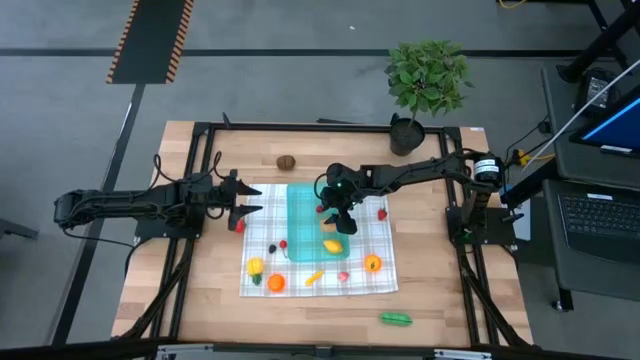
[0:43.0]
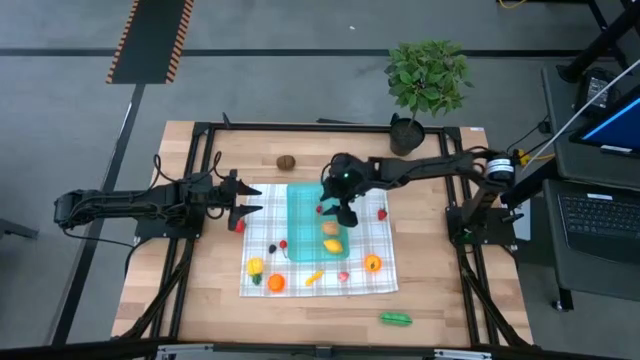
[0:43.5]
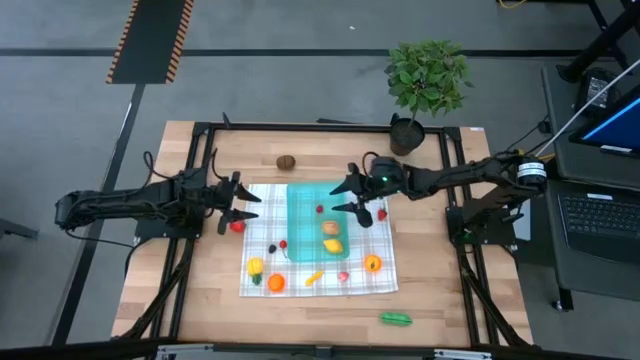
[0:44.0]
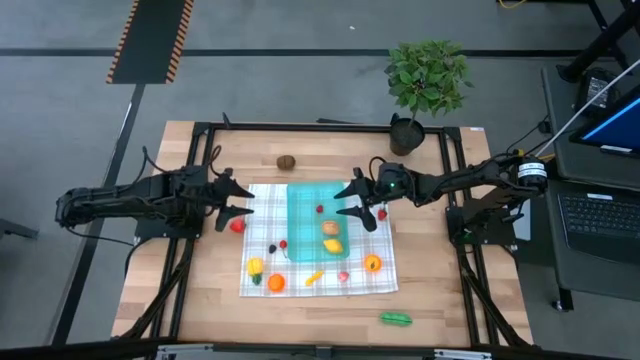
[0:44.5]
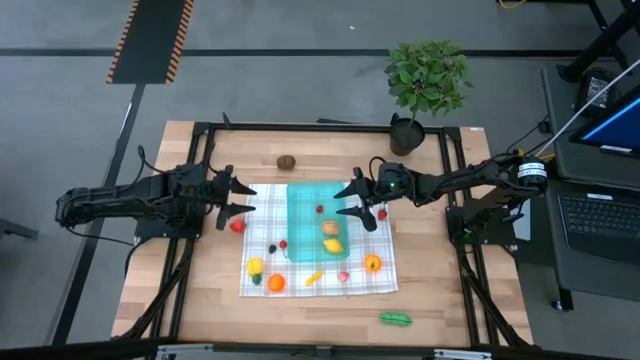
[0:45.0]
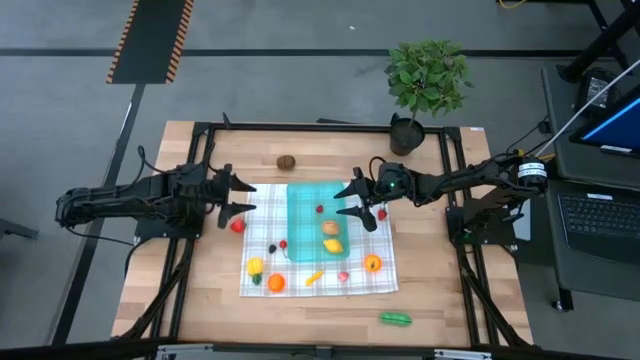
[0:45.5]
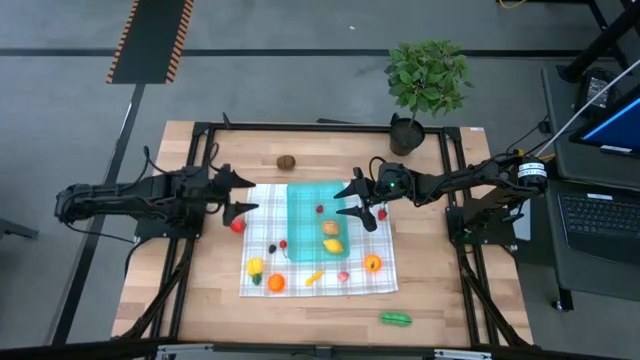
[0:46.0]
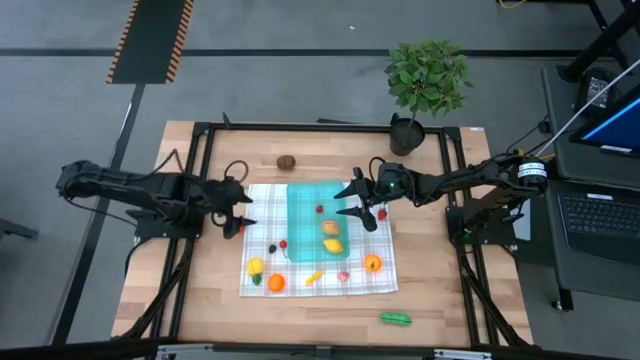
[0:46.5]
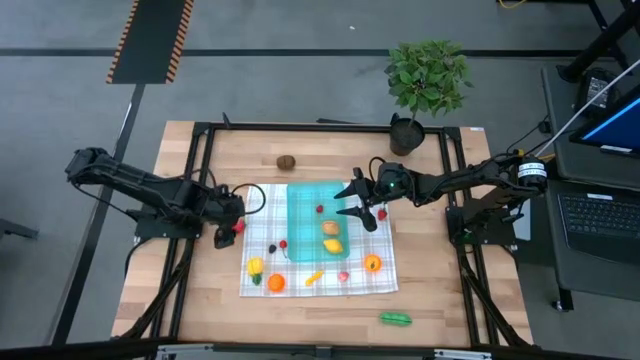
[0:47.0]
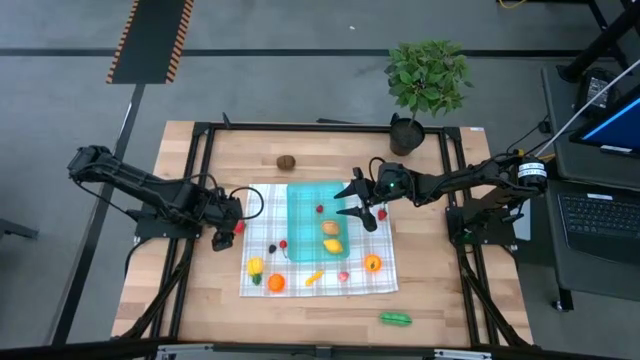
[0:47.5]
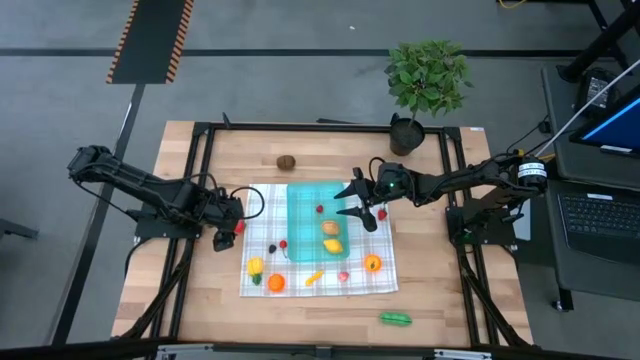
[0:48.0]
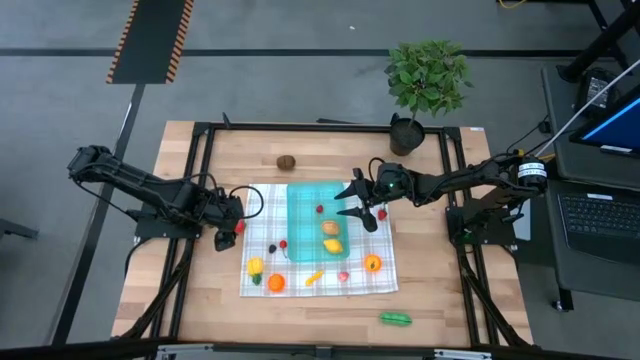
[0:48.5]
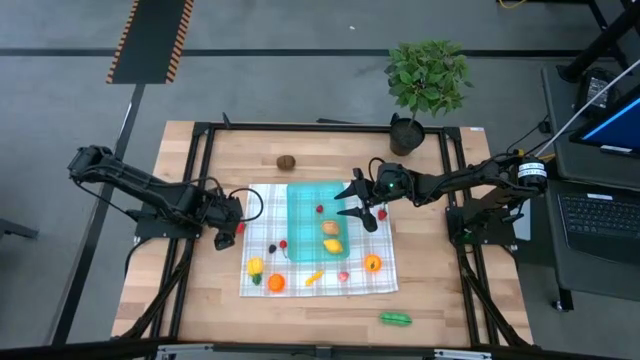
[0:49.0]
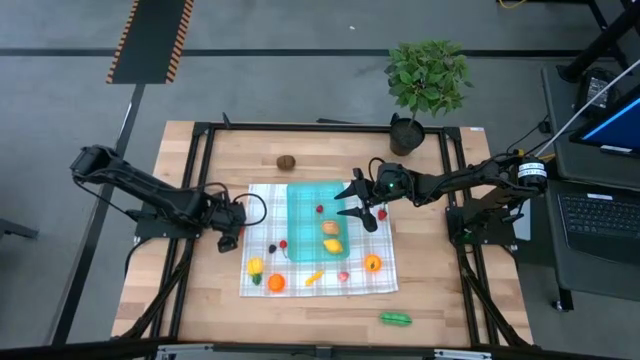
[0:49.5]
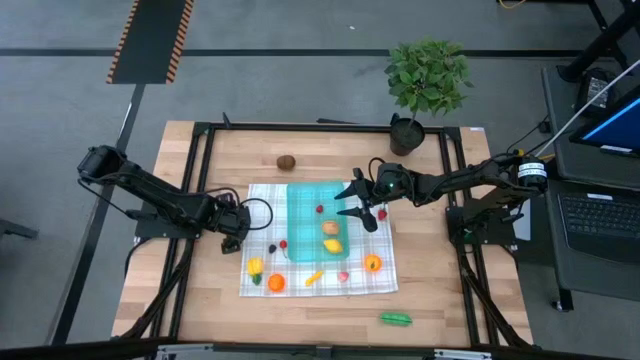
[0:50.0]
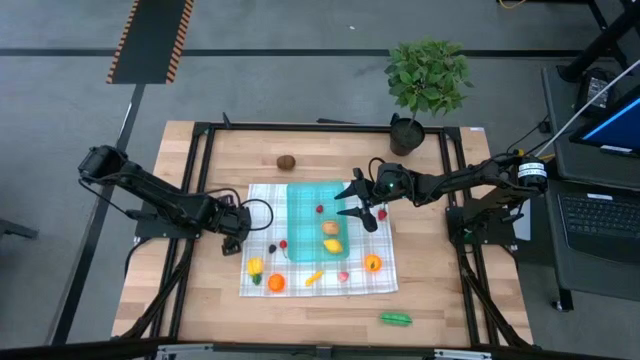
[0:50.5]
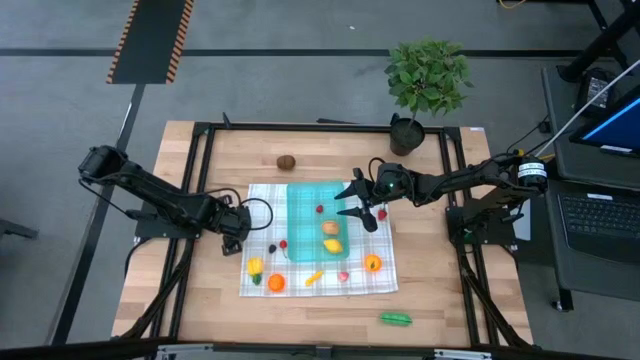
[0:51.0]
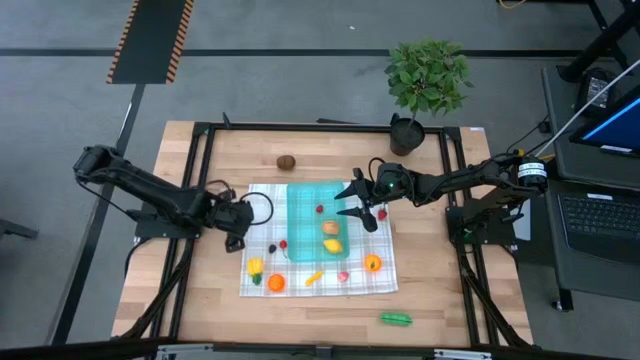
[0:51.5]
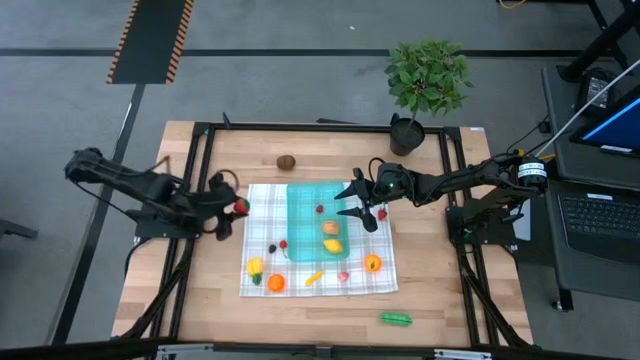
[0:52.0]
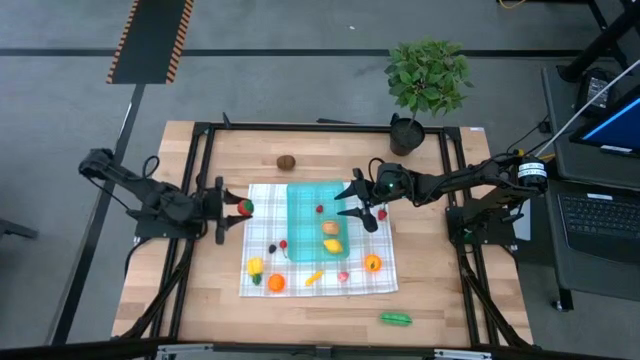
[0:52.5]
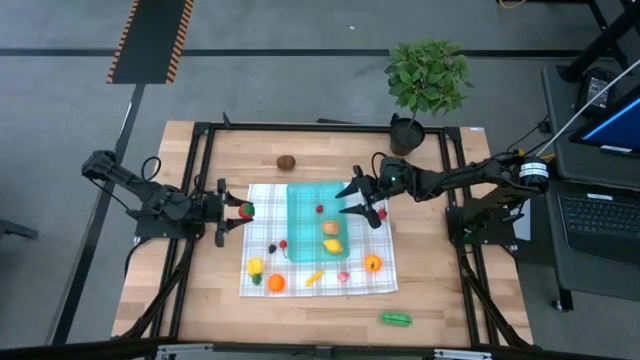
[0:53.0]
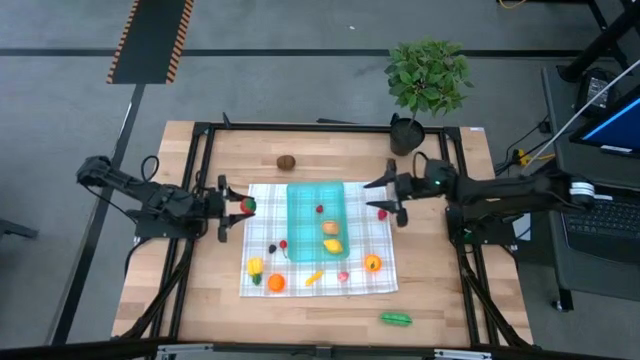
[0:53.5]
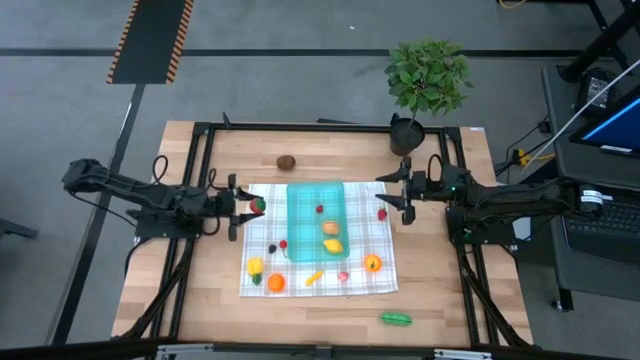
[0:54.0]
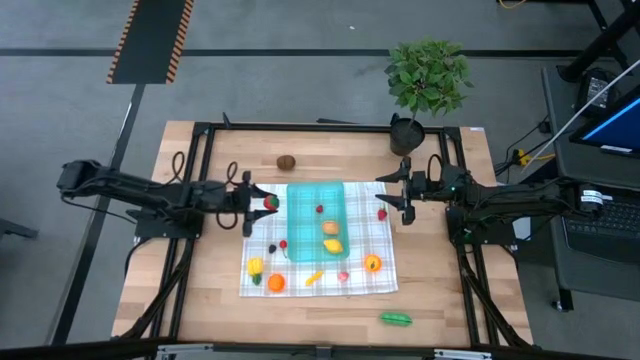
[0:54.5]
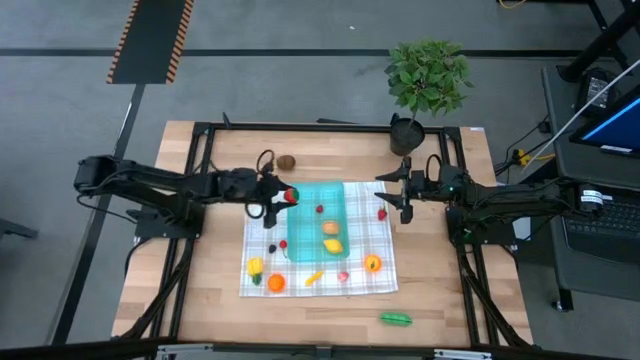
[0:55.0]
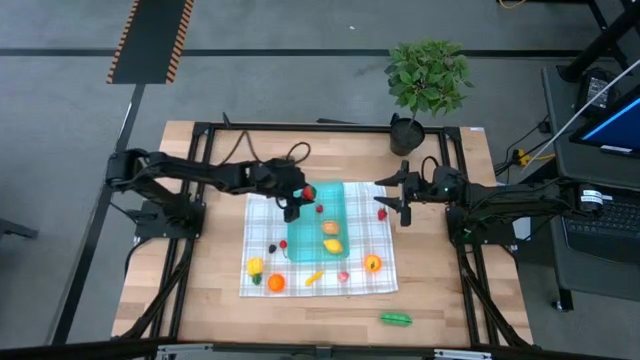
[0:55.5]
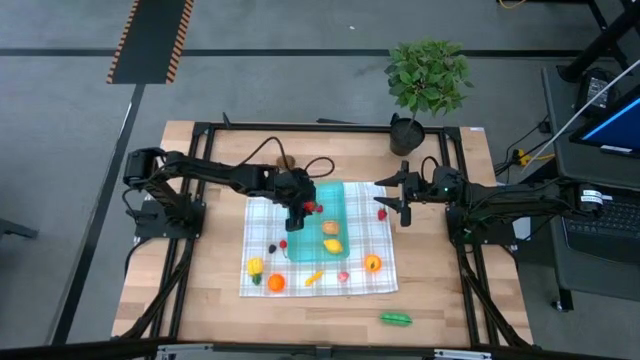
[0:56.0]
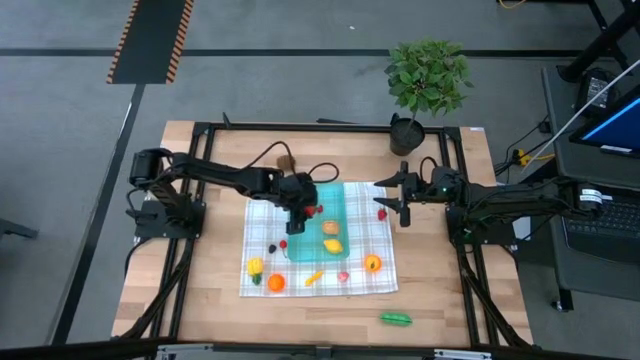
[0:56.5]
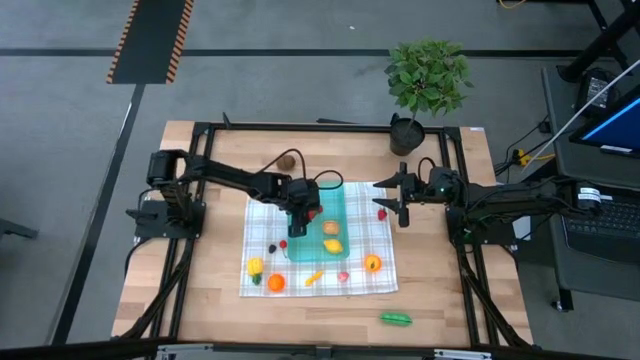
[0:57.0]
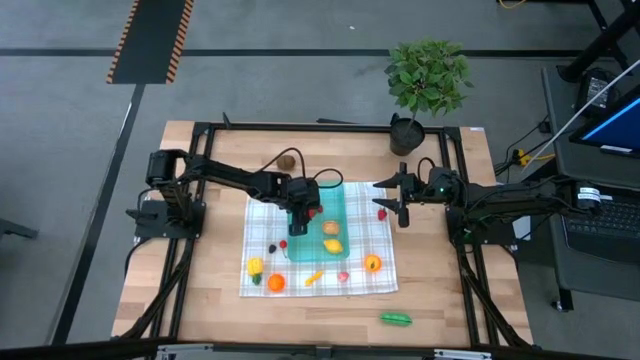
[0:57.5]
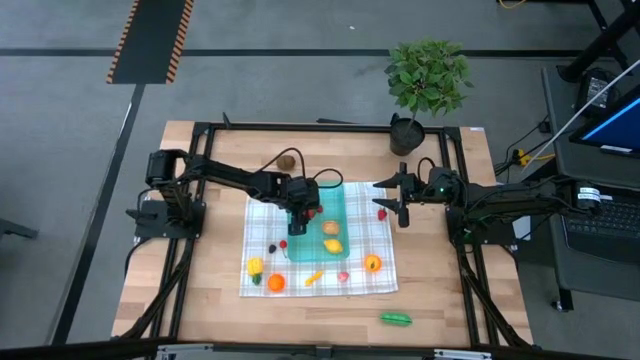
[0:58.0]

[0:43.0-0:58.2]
Task: Pick and placing Produce into tupperware
Put the bottom strawberry into the blue bin

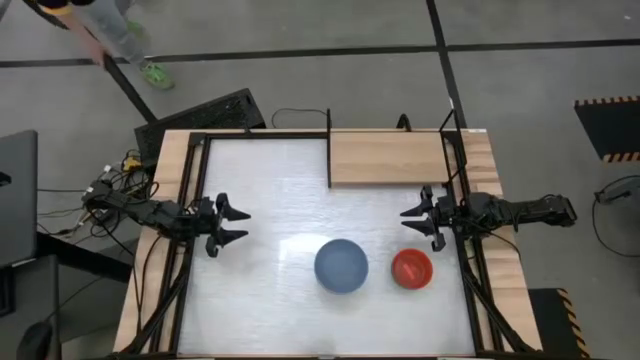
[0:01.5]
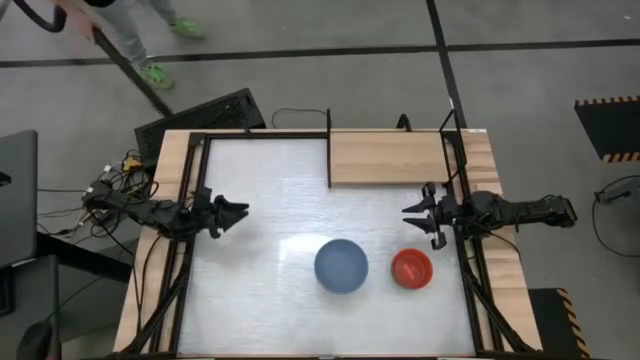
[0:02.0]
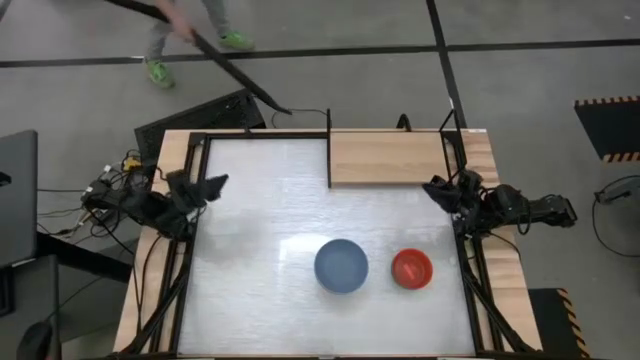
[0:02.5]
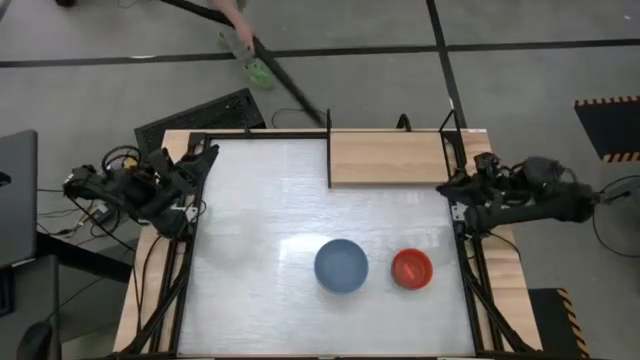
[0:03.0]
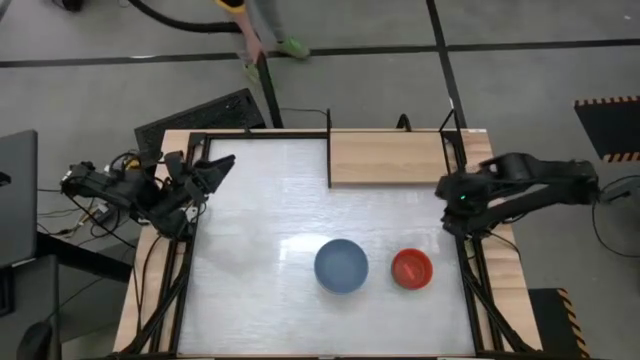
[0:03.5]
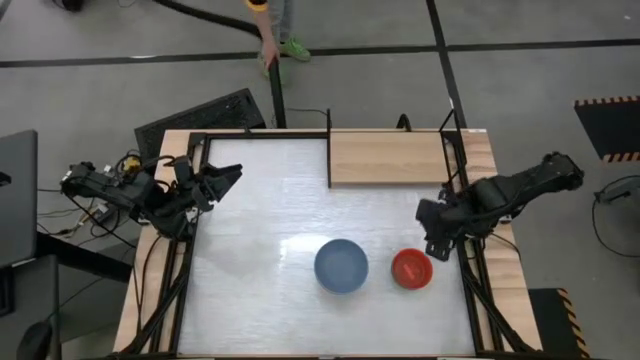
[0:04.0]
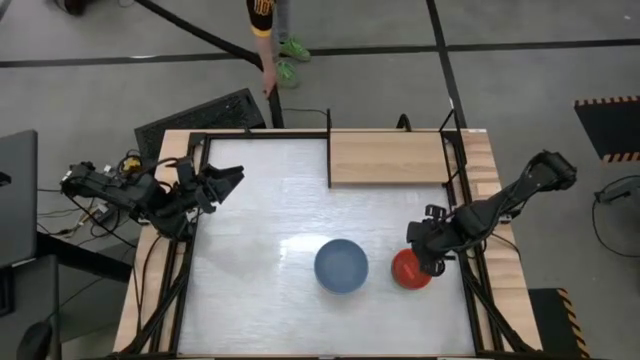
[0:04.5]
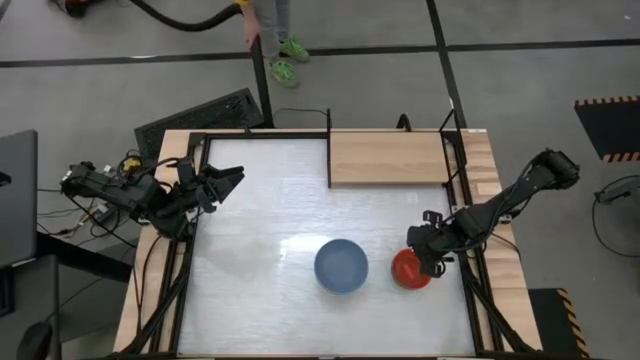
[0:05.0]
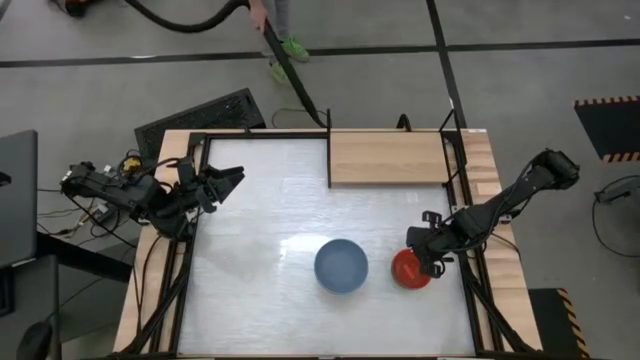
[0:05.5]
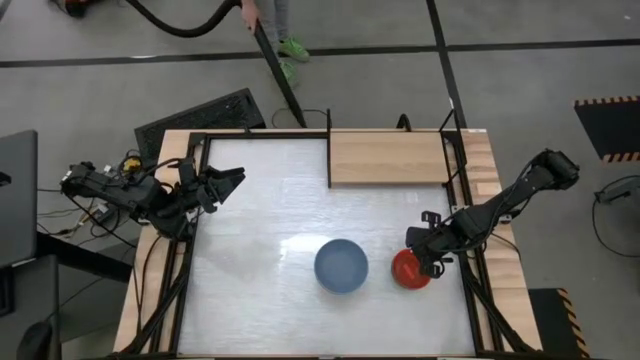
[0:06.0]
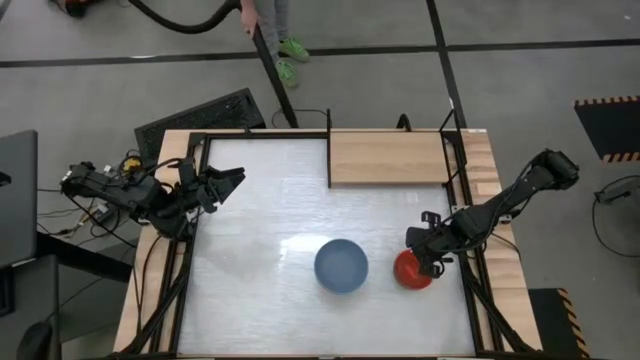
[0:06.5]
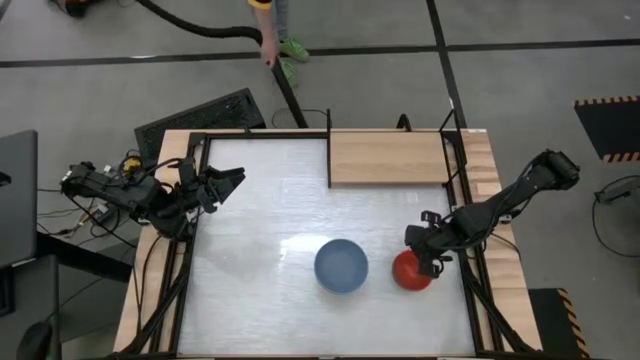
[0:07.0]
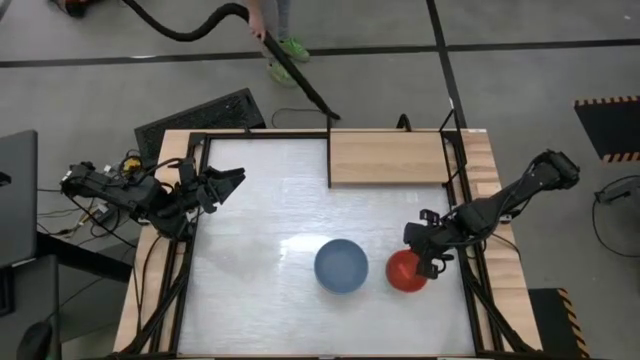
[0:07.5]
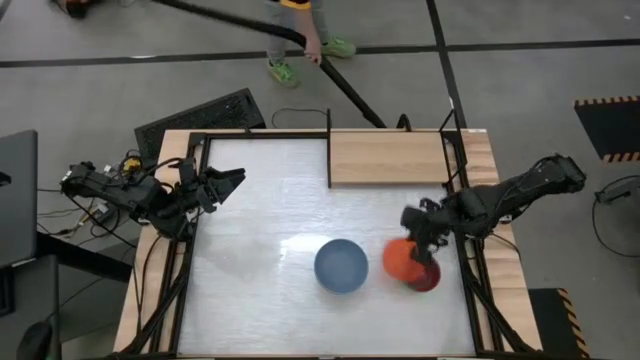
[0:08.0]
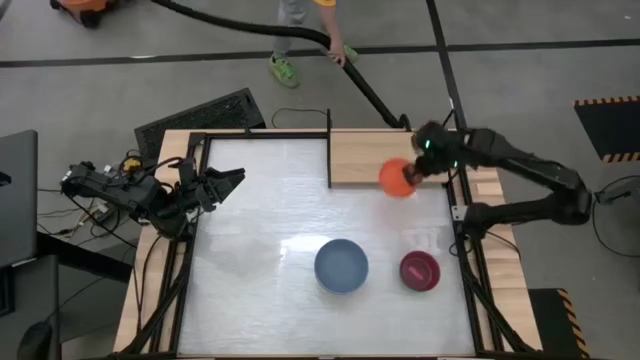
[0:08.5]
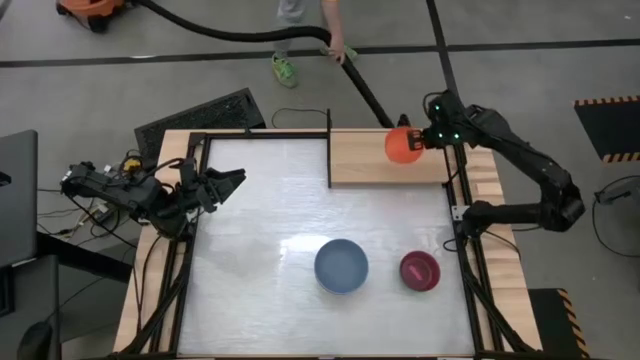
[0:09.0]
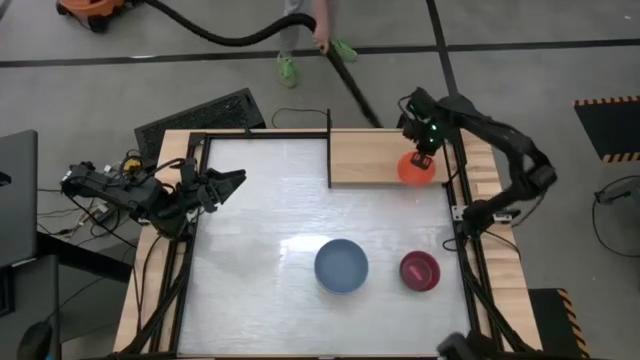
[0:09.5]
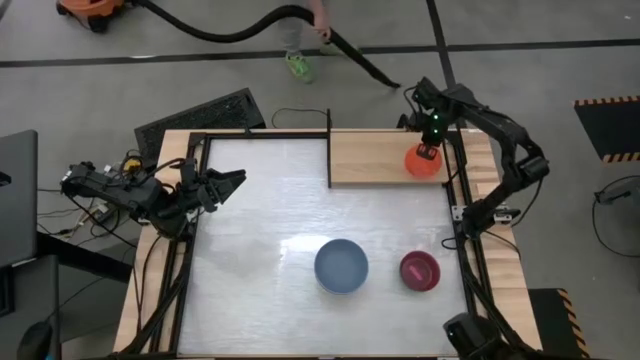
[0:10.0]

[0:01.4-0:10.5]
Task: Place and stack bowls onto a shelf
Put the orange transparent bowl on the shelf
